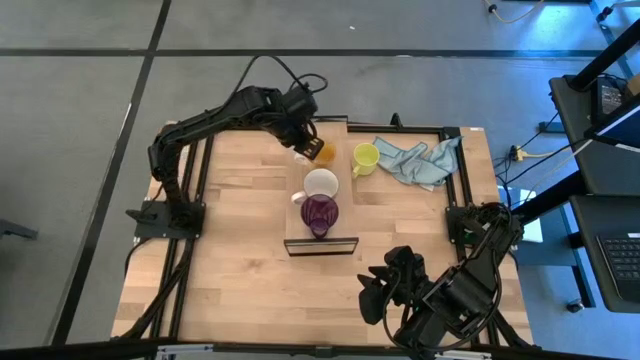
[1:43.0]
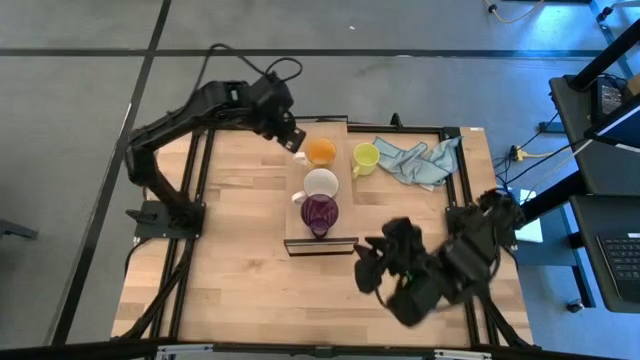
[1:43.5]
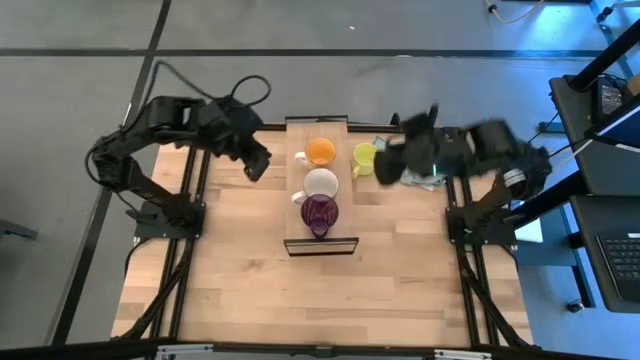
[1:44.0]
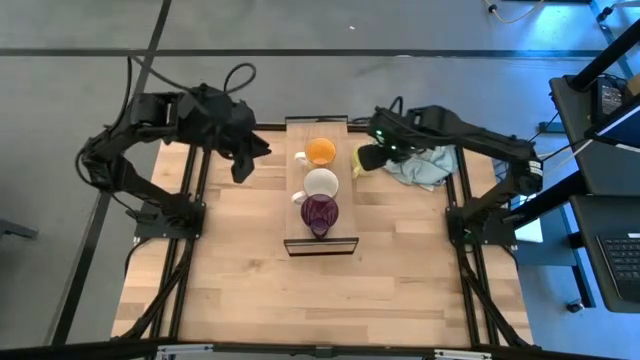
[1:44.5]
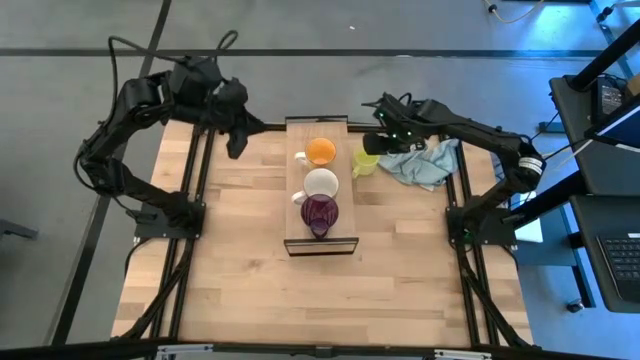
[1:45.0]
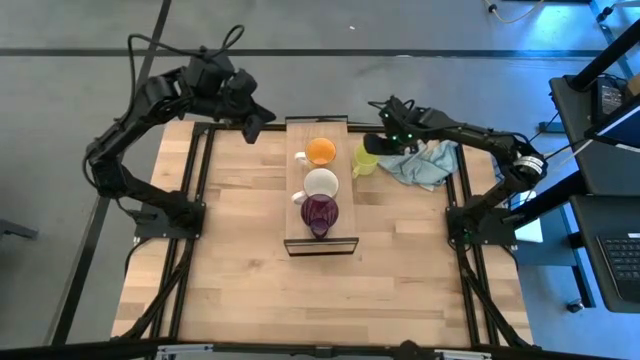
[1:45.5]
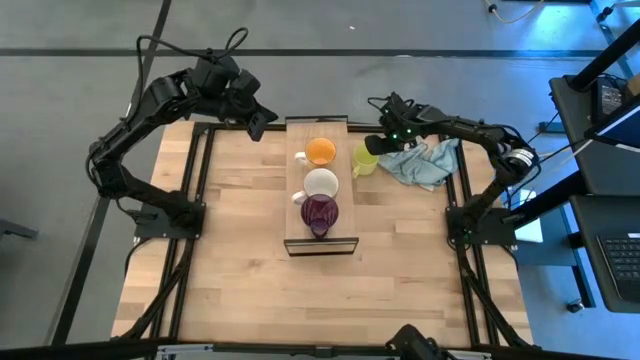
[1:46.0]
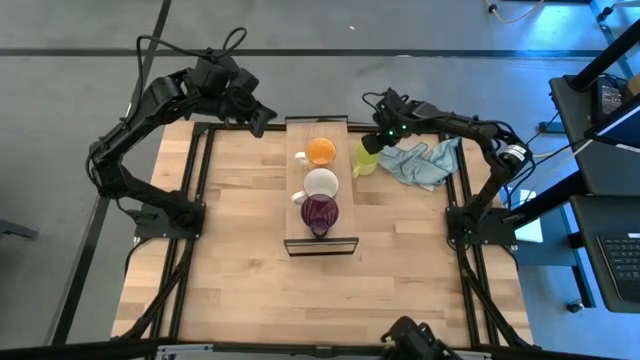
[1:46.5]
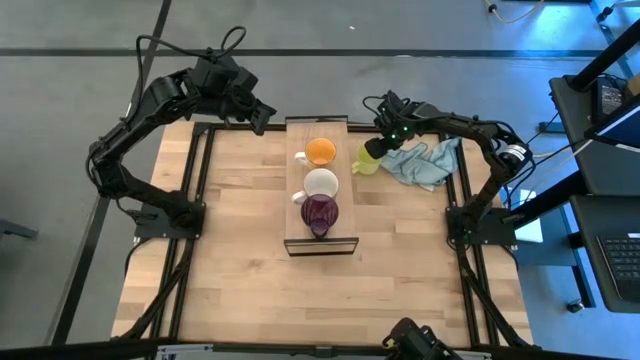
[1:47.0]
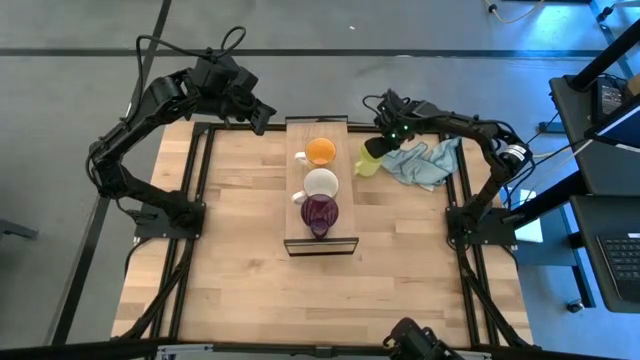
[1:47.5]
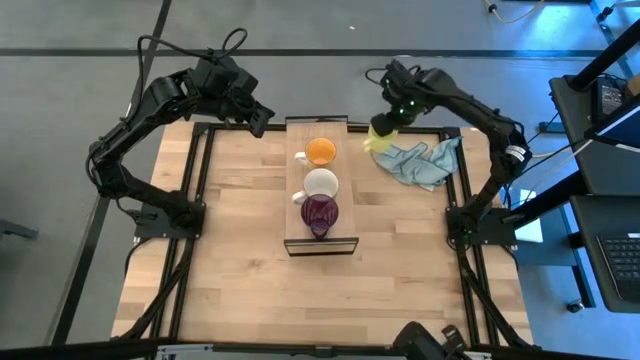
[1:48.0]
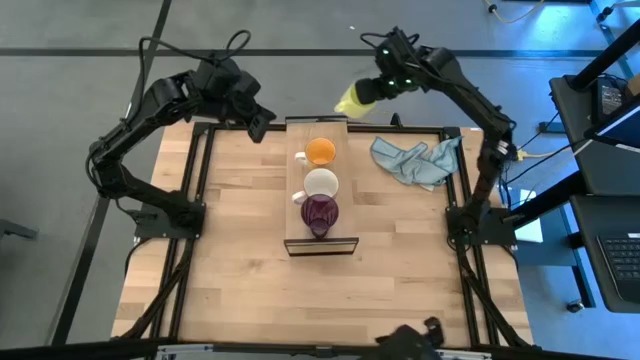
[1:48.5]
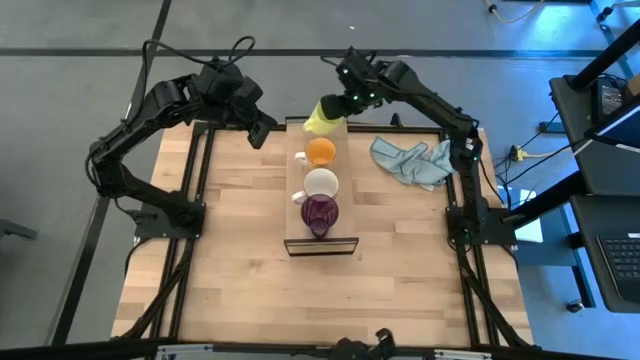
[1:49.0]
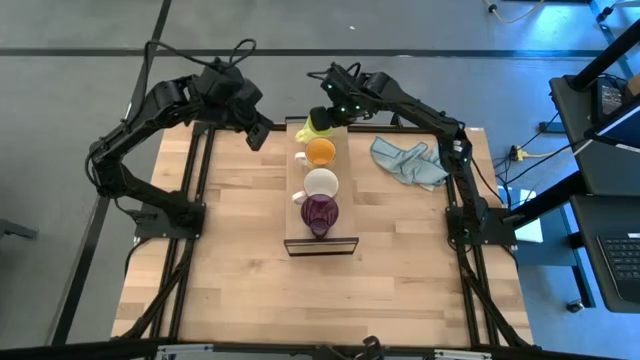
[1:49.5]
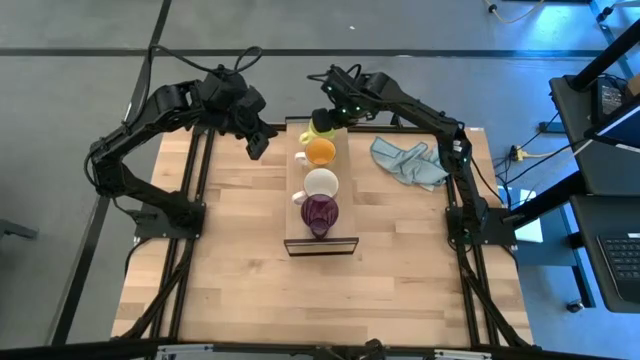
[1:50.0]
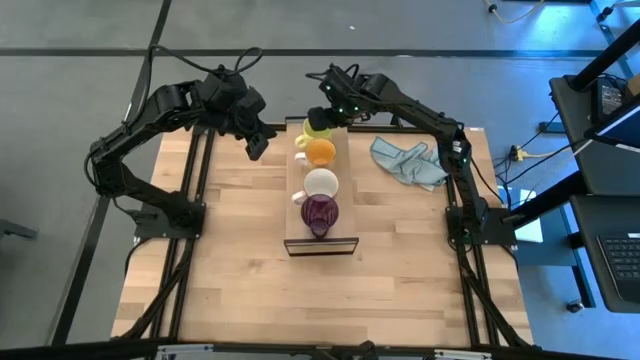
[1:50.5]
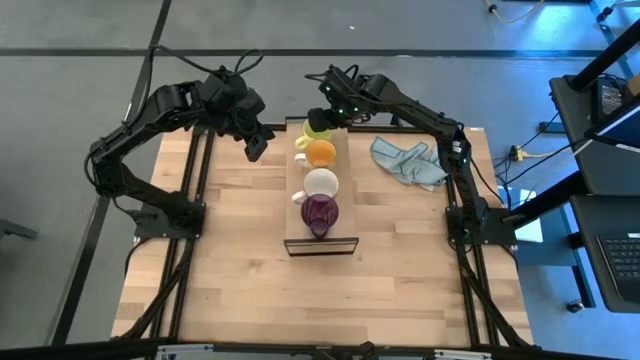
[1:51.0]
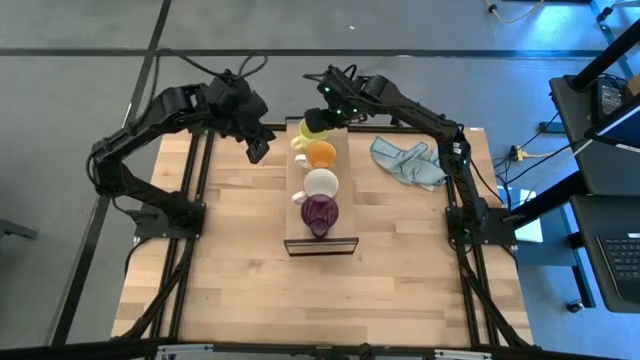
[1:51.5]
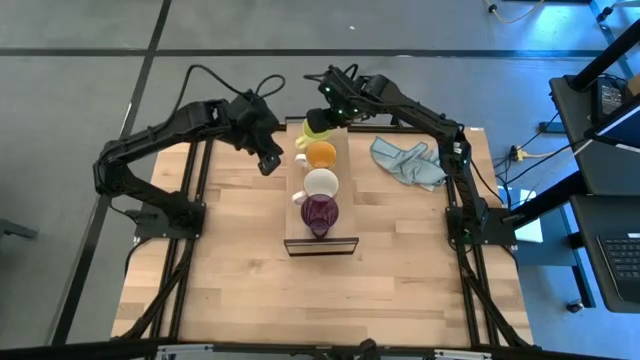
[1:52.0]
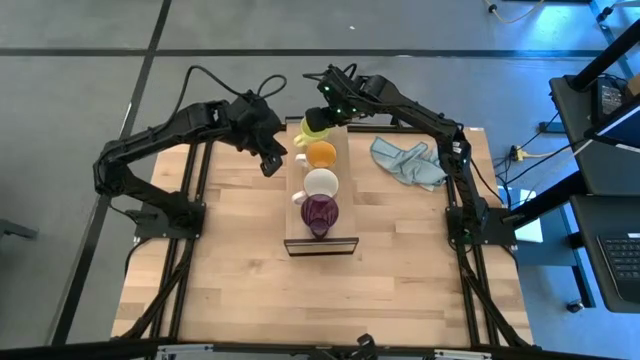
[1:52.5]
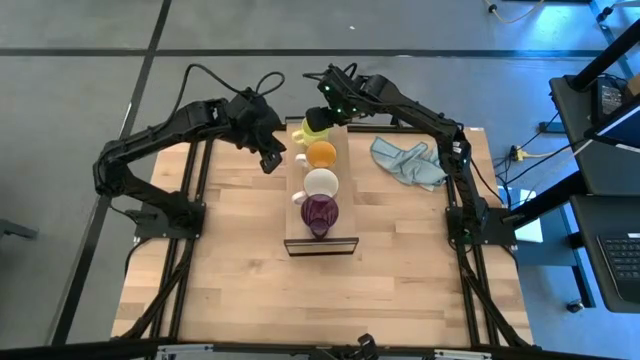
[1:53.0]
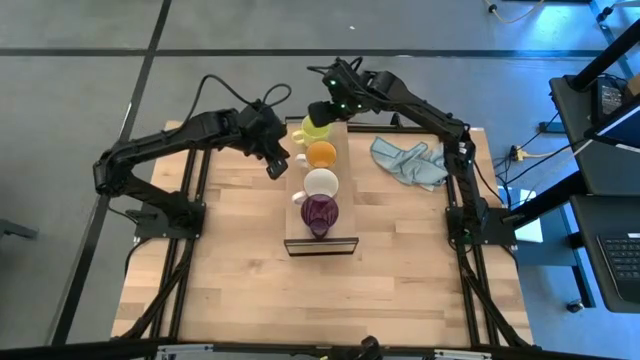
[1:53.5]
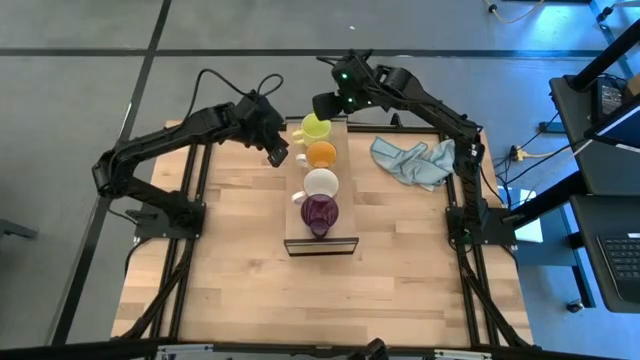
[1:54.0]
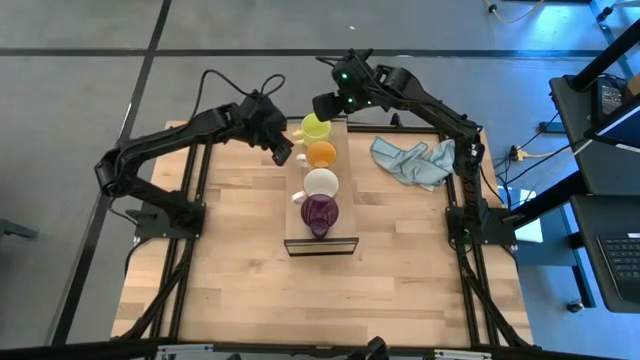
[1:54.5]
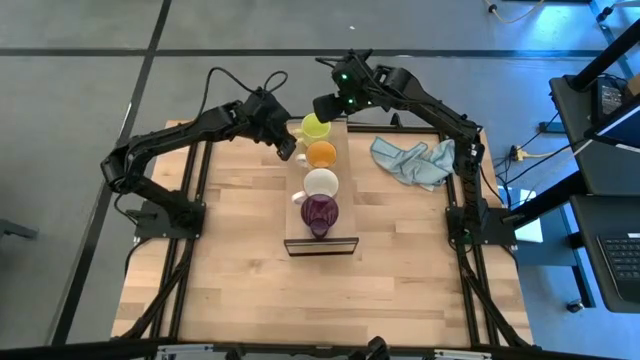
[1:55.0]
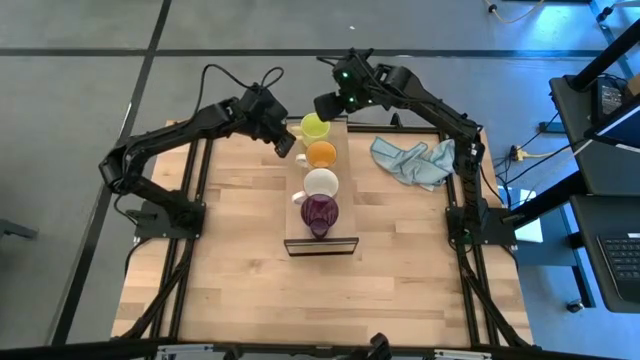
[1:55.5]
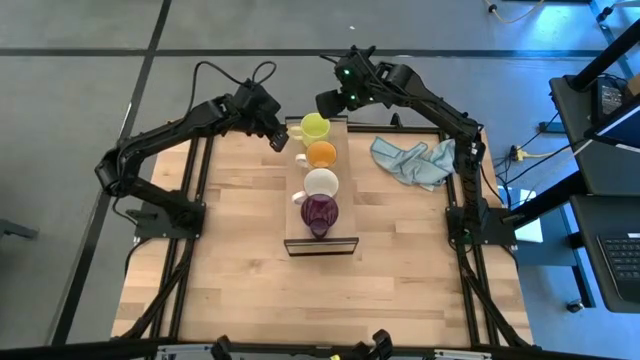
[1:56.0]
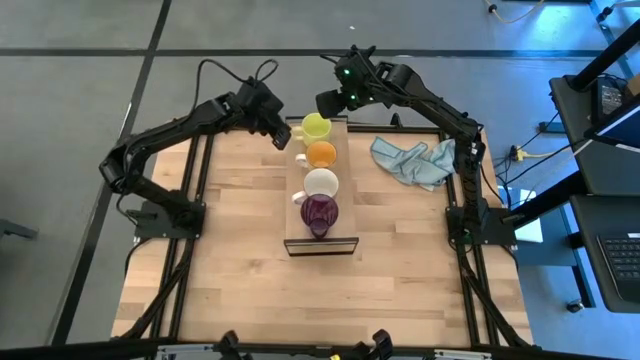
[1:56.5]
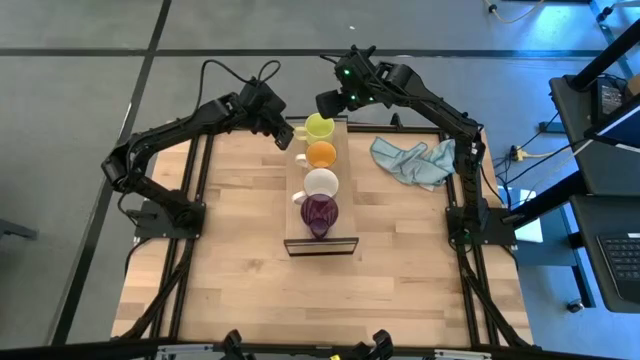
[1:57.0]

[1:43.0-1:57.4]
Task: Stack small to large cups/mugs on shelf
Put the light yellow mug on the shelf

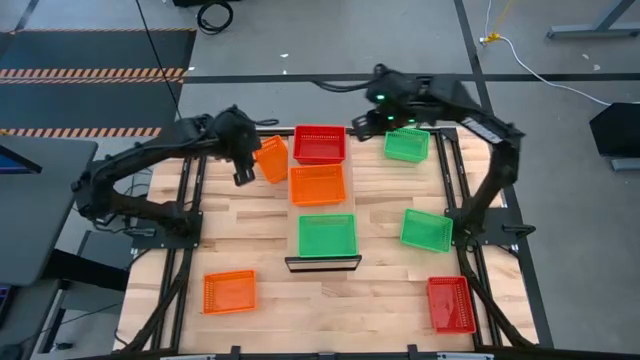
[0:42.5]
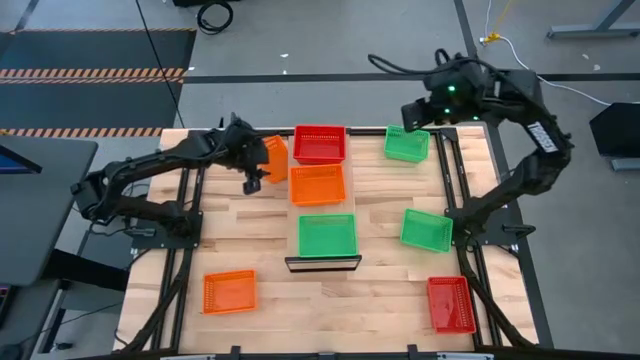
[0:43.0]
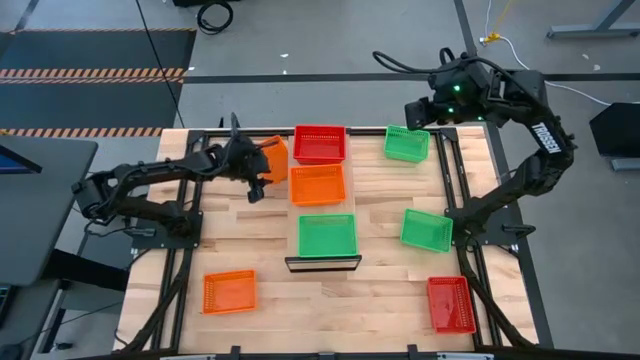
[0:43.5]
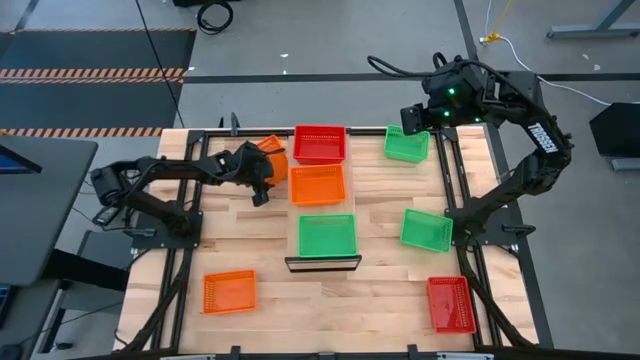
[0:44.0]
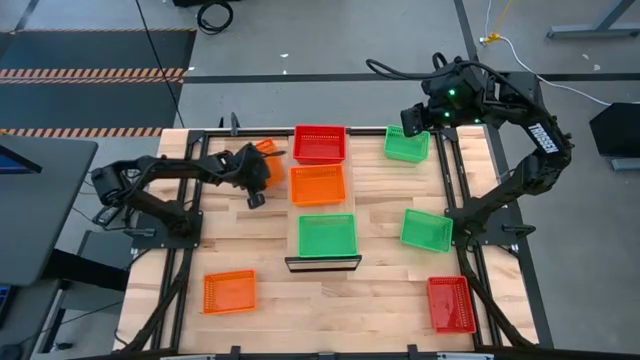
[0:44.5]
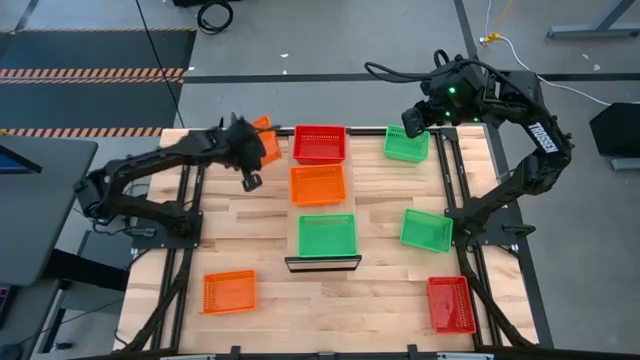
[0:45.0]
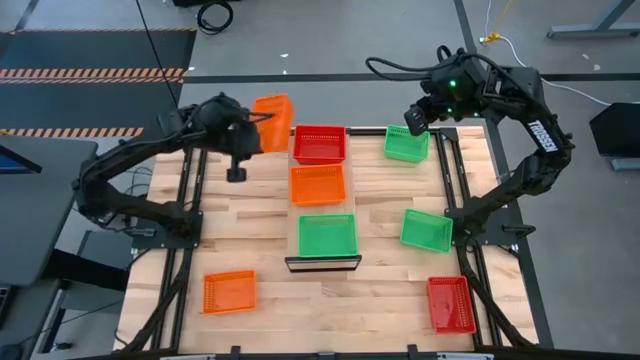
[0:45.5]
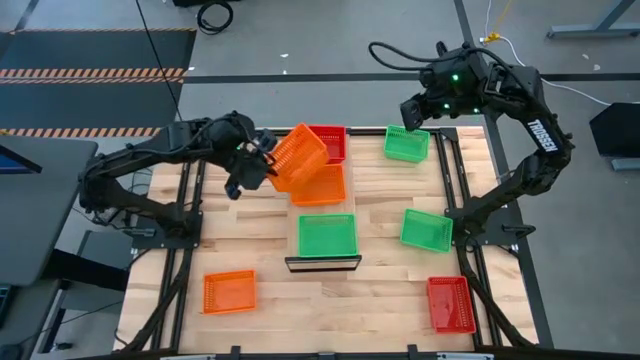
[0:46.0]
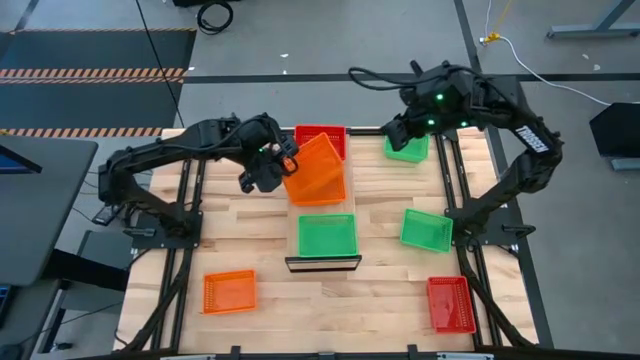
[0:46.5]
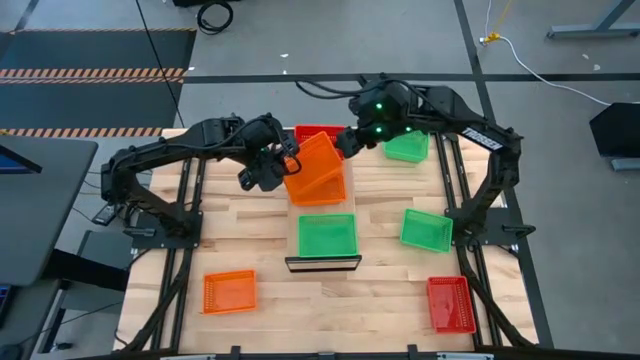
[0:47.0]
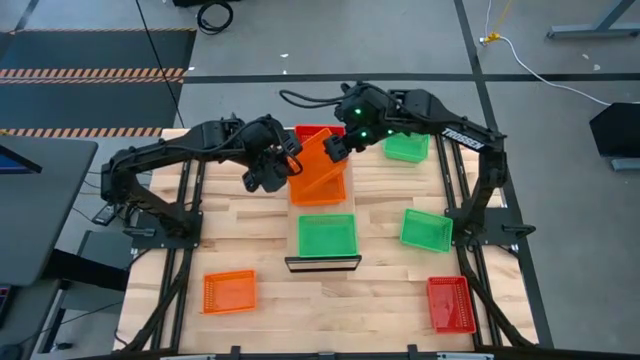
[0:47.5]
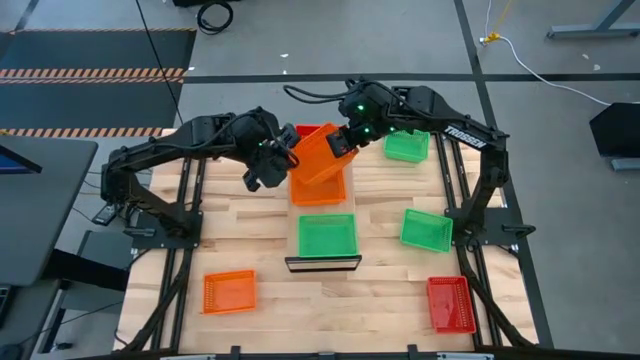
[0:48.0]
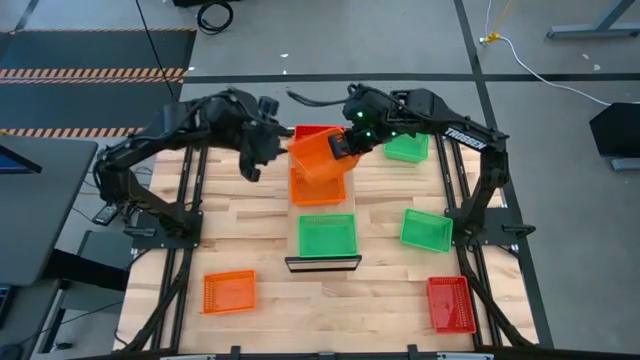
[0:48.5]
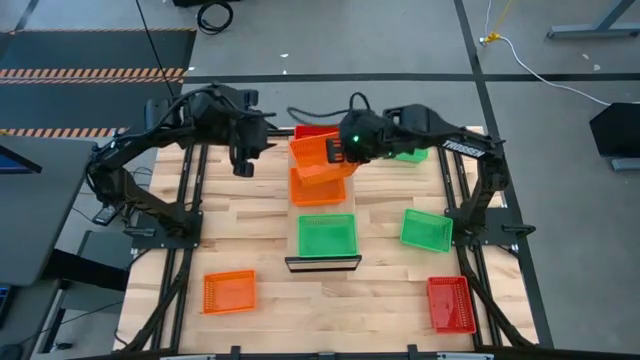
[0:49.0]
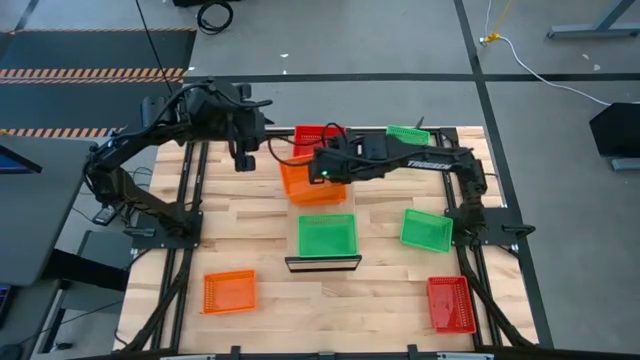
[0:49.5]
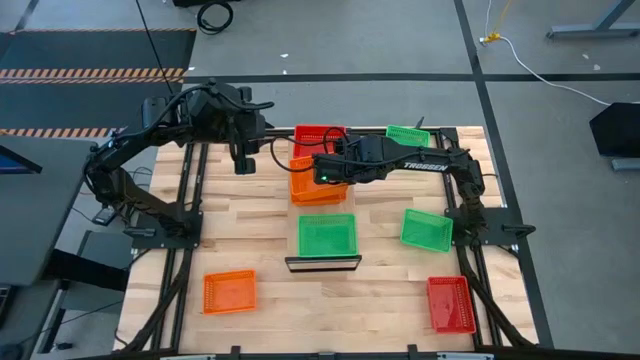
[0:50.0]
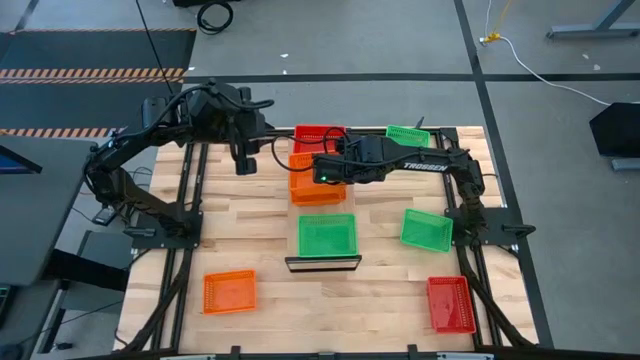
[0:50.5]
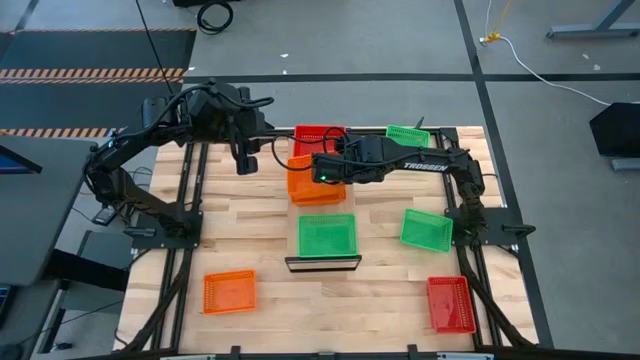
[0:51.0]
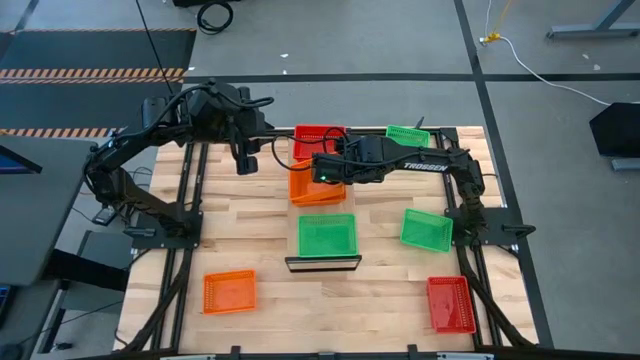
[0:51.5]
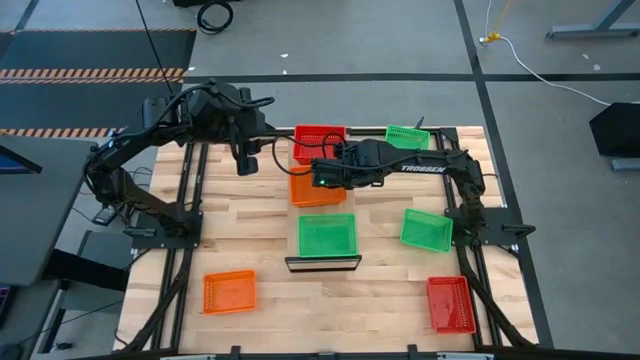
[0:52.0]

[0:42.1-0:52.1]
Task: Stack baskets on shelf by color
Stack the top orange basket on top of the orange basket on the shelf
